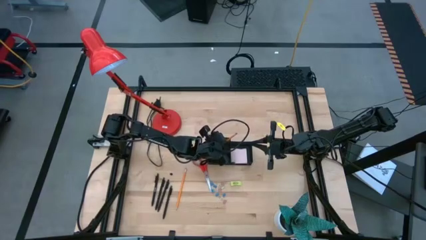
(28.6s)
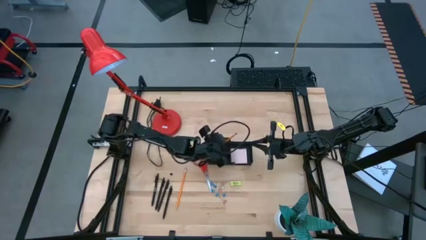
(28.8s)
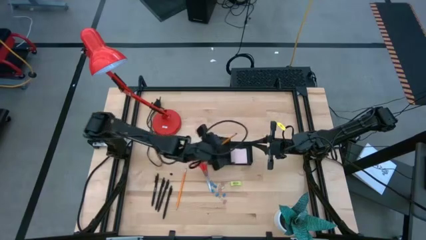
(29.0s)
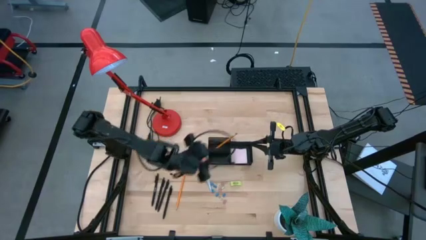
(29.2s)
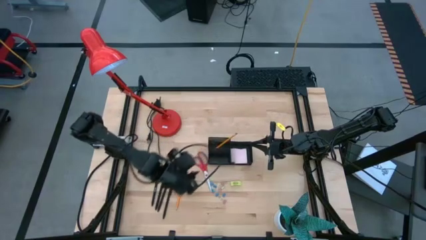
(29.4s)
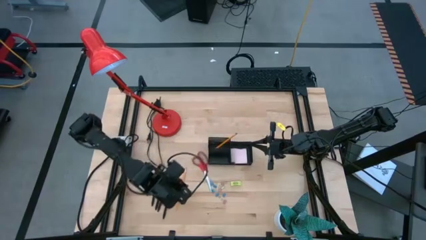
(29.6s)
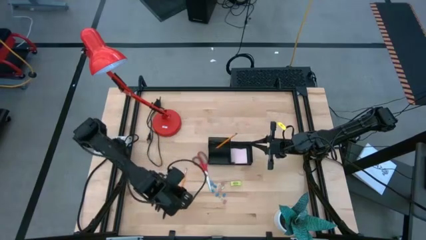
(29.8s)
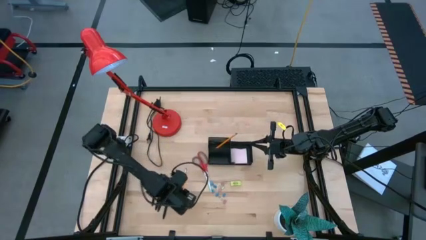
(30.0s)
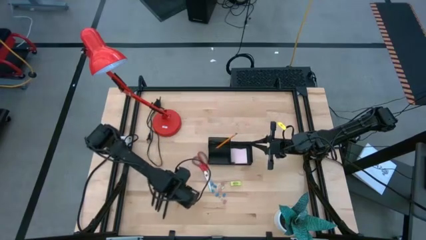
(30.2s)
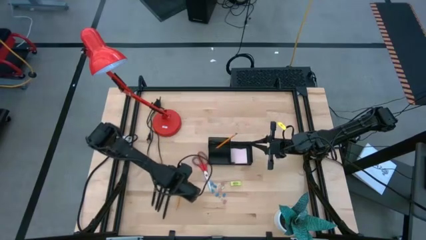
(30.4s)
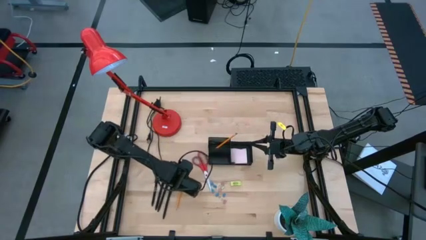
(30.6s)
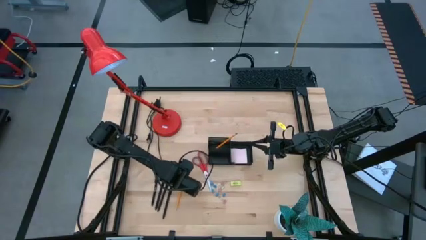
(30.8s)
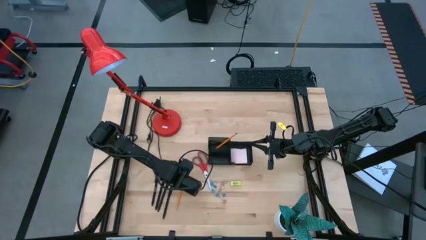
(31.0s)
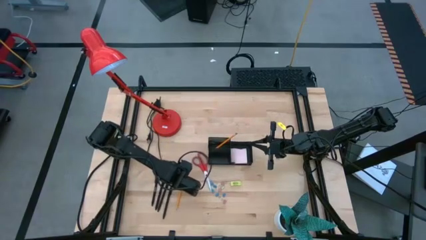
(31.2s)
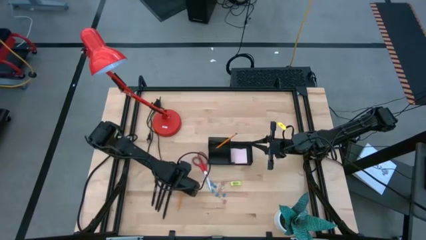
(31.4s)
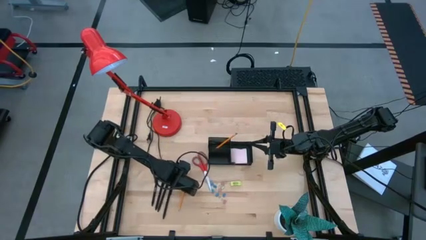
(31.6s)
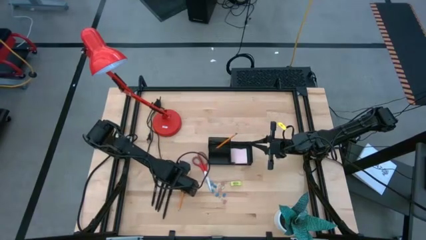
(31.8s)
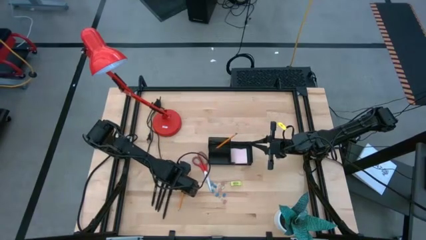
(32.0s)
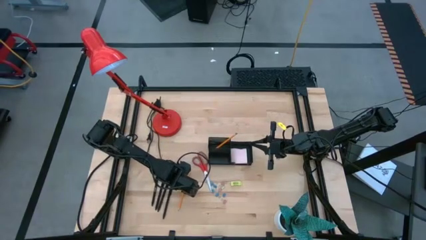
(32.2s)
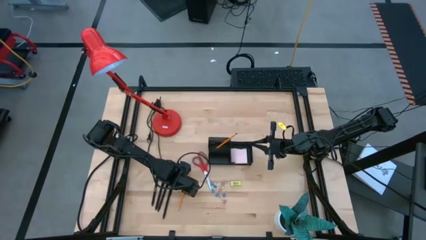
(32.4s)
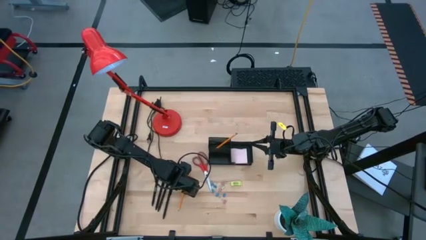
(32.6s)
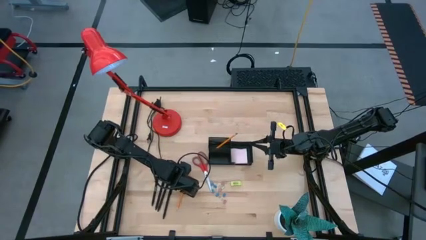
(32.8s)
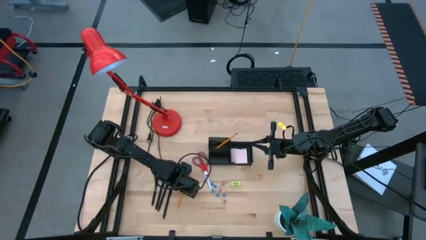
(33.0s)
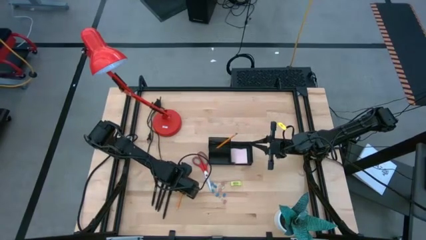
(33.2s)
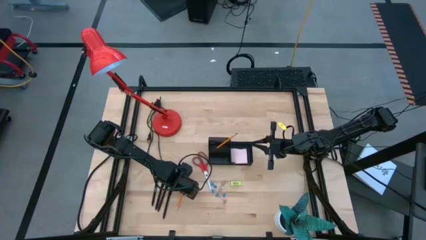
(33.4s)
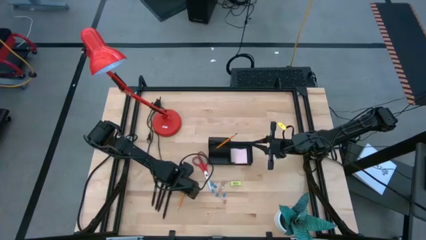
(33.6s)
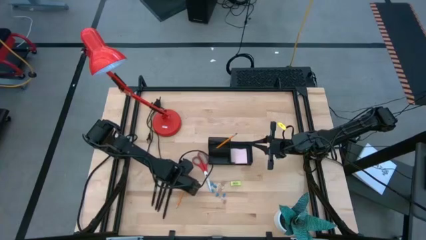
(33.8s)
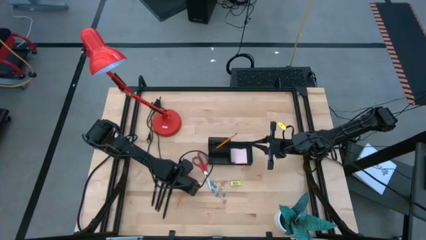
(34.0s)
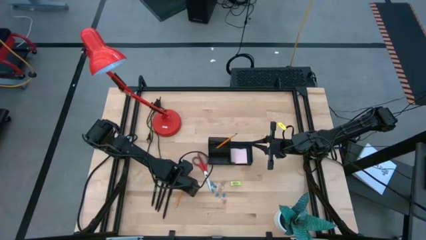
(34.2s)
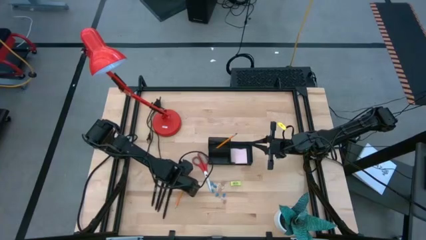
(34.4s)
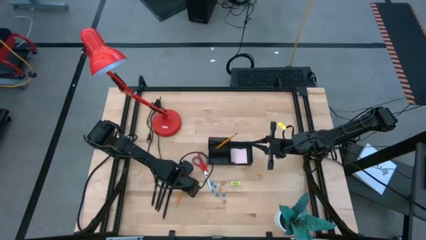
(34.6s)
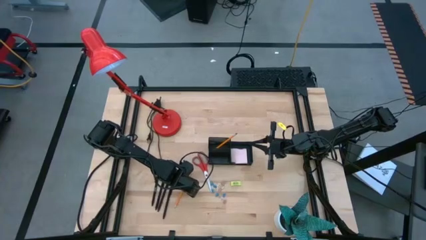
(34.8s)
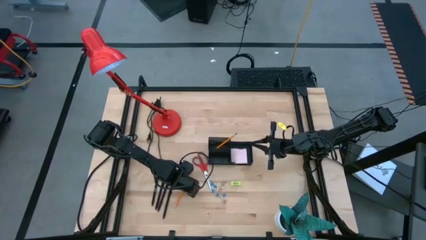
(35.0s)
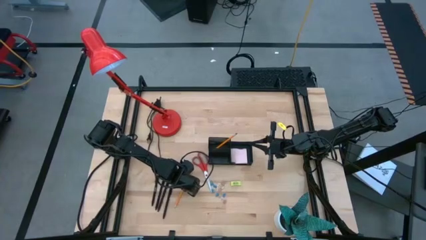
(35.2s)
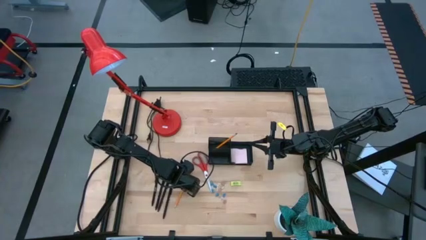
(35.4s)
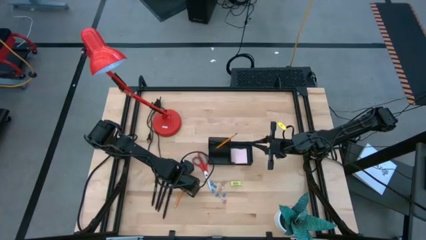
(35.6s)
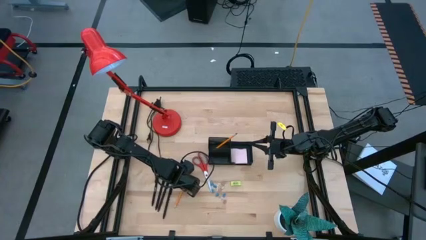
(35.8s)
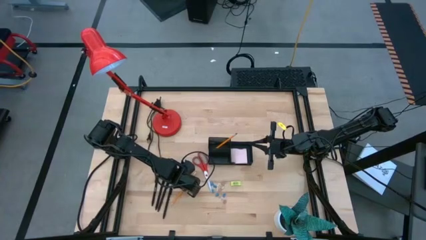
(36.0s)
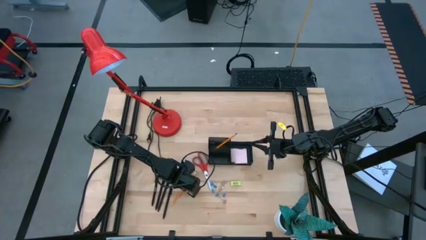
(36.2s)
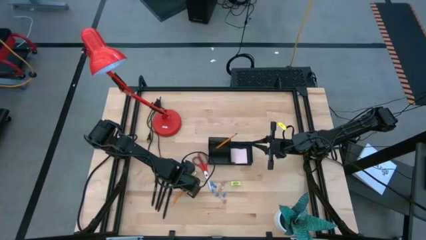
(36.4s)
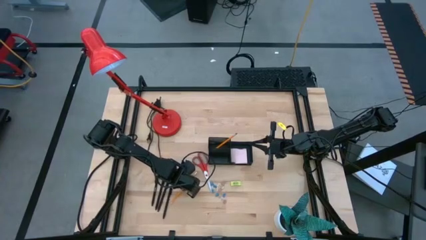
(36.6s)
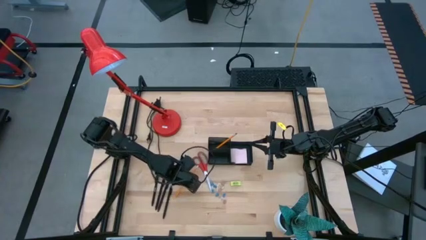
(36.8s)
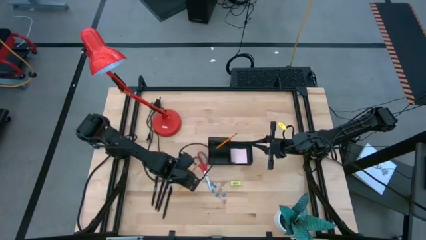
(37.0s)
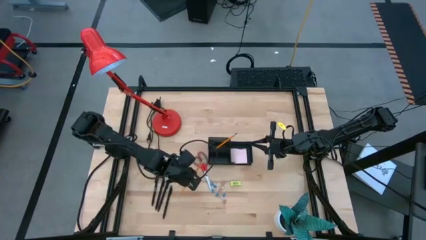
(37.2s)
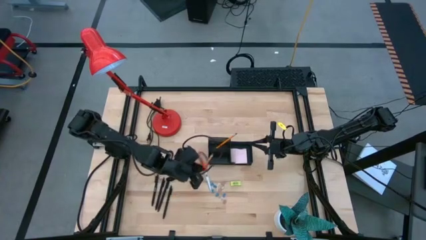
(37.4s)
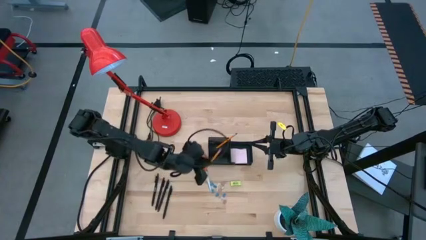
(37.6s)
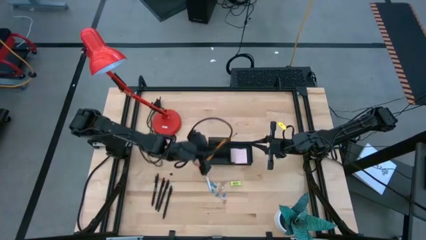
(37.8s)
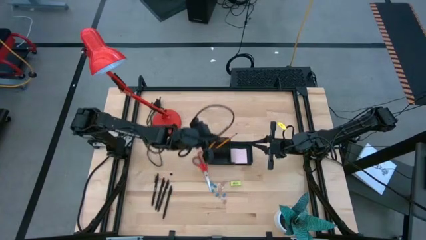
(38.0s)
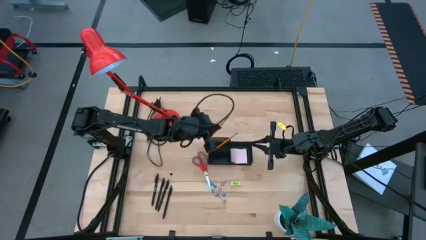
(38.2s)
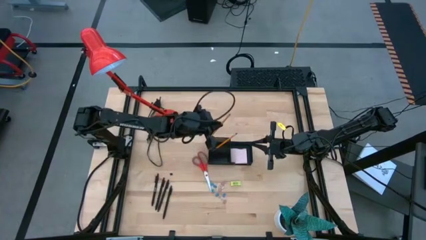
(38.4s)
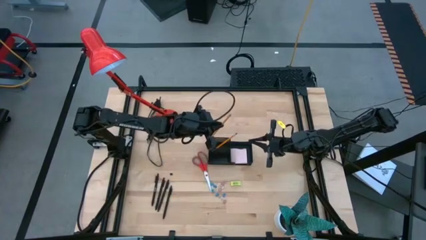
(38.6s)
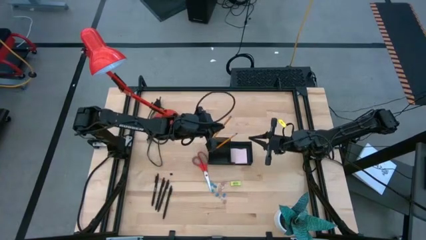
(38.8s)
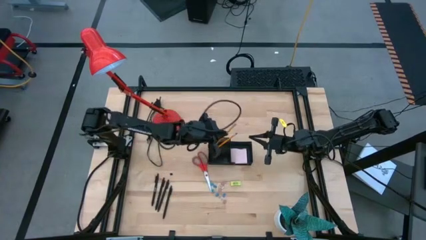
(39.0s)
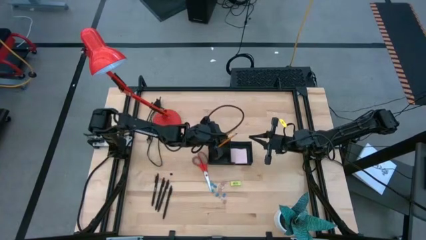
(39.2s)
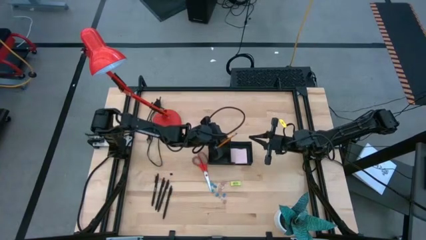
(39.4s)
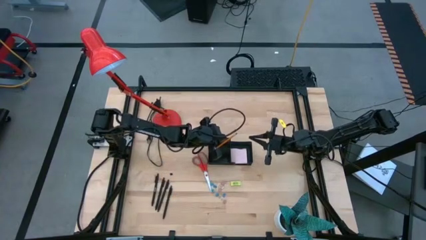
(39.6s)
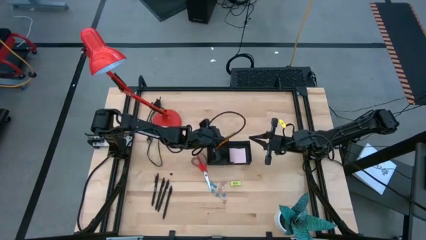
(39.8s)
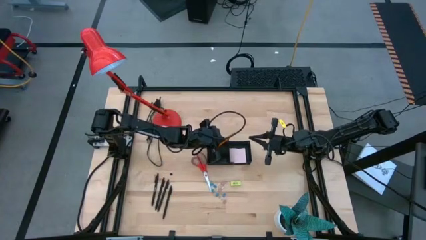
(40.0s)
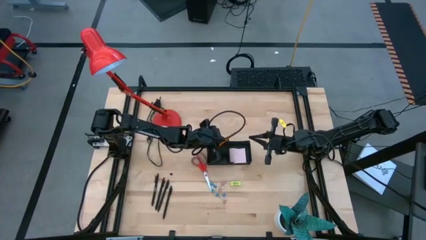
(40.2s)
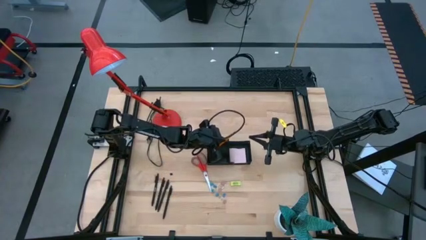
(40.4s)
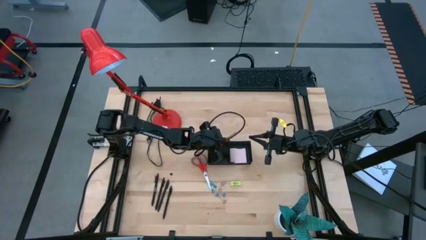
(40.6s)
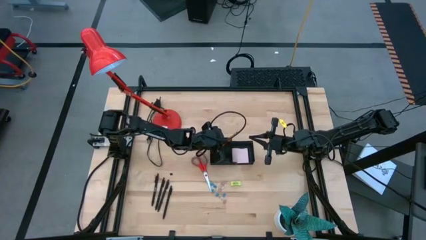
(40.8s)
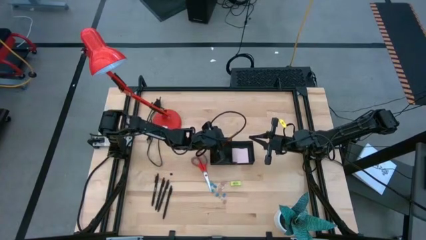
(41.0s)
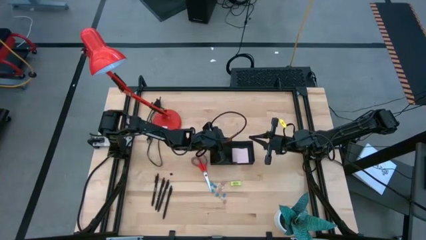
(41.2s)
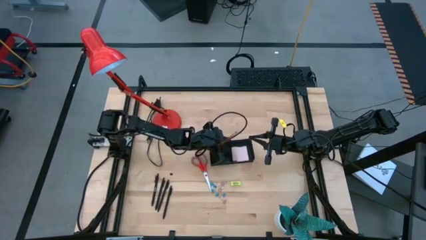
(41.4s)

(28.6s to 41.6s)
Task: Pick and place office supplies into organizer
Put the orange pencil into the black desk organizer

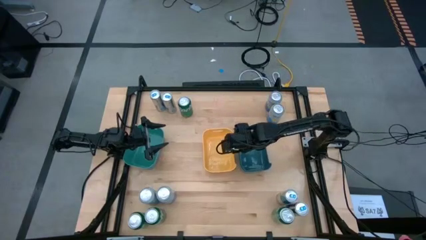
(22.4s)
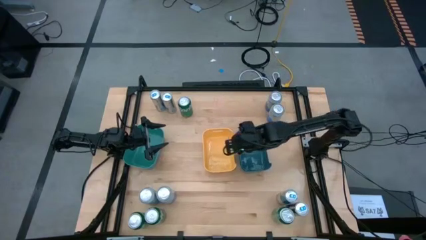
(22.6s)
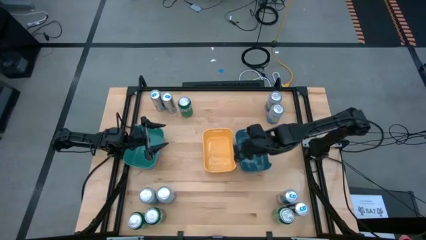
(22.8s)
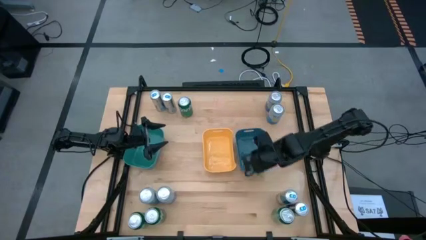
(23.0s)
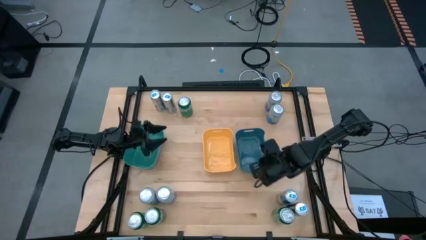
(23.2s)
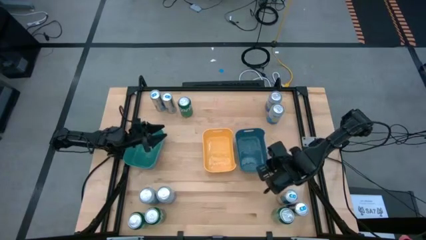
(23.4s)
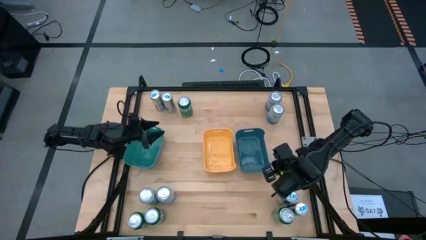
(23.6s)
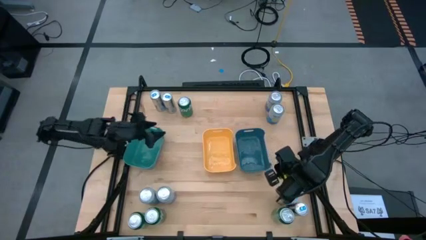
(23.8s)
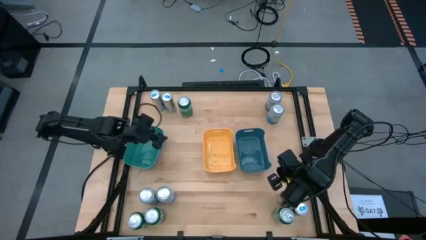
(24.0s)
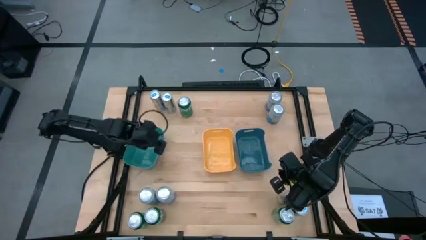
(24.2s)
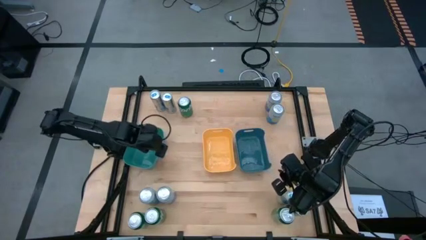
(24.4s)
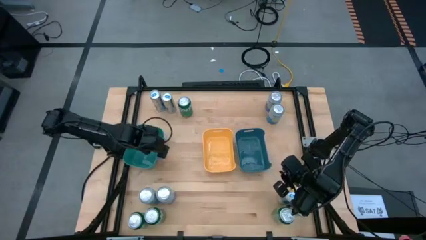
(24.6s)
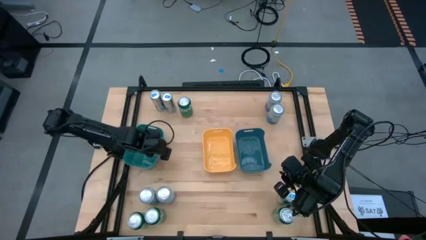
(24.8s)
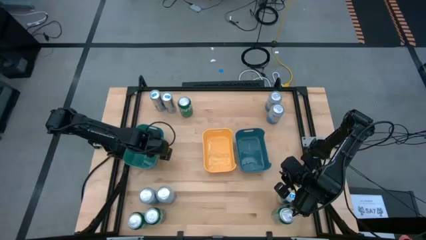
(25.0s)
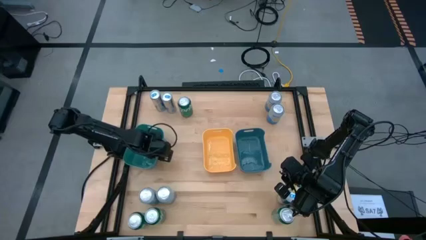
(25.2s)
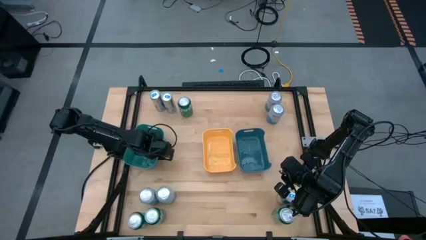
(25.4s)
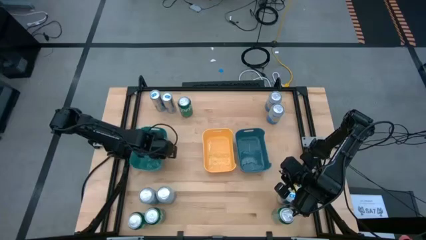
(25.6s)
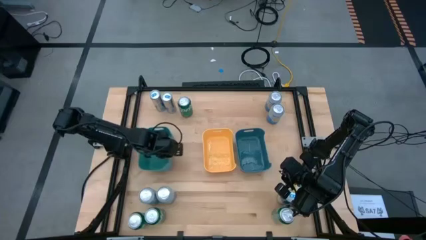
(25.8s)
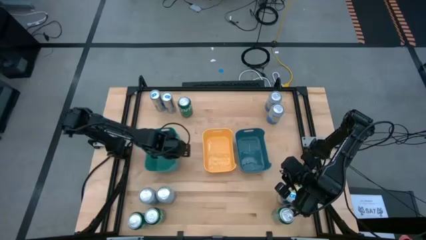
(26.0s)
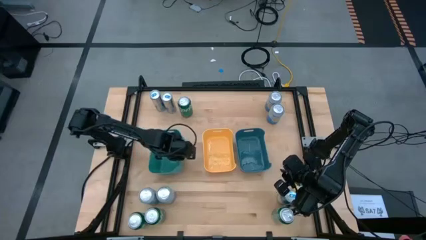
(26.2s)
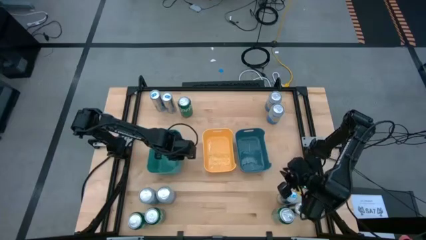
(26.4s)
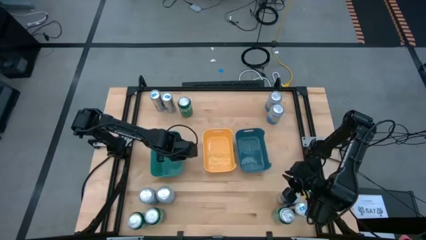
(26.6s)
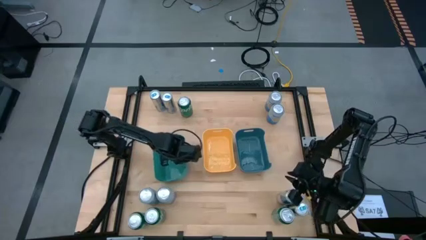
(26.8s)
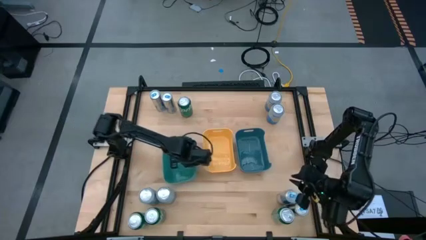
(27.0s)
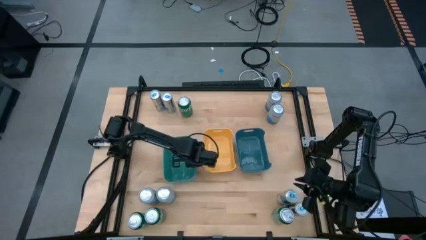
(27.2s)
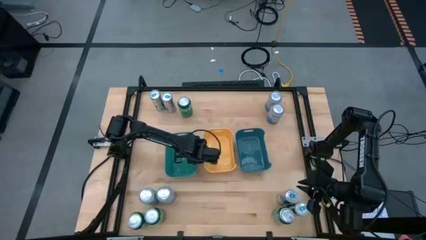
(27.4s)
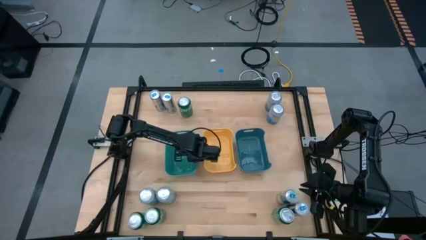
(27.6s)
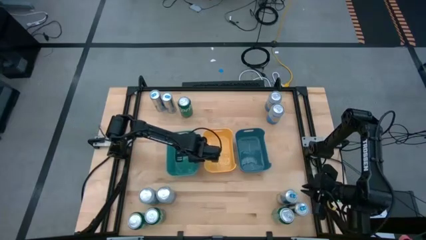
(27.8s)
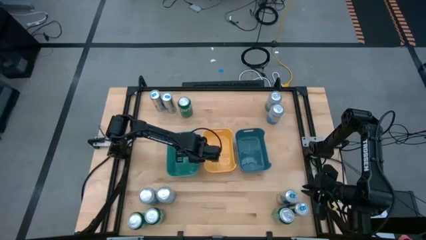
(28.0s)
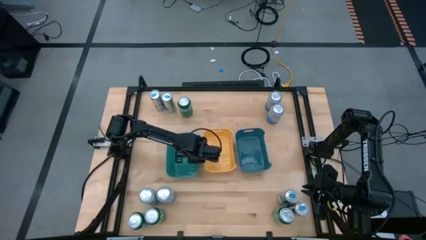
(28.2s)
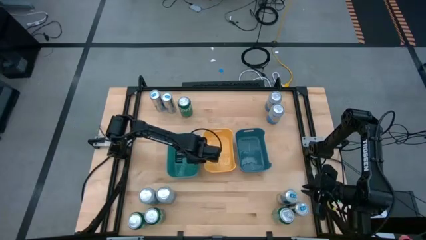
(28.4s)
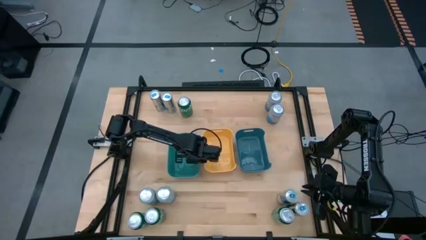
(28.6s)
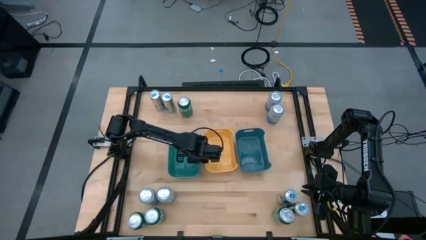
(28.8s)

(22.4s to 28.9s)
Task: Sort soda cans
Move the light blue bin to the left side of the yellow bin
